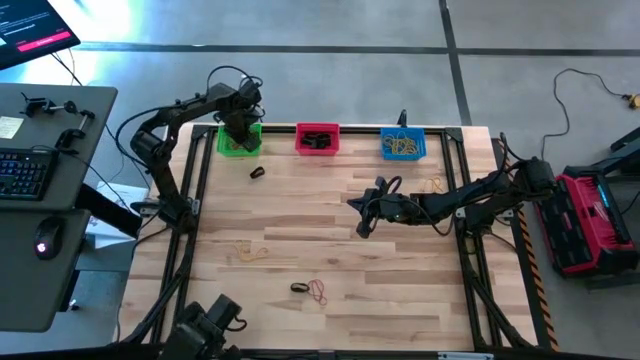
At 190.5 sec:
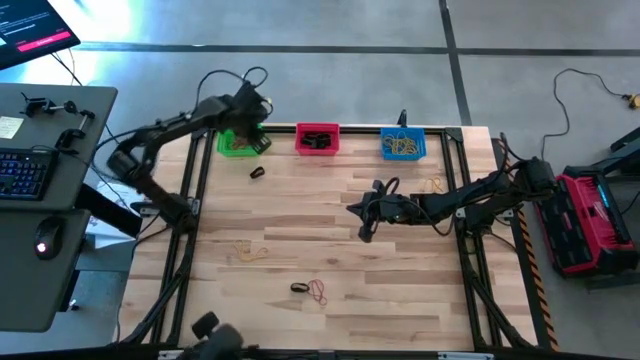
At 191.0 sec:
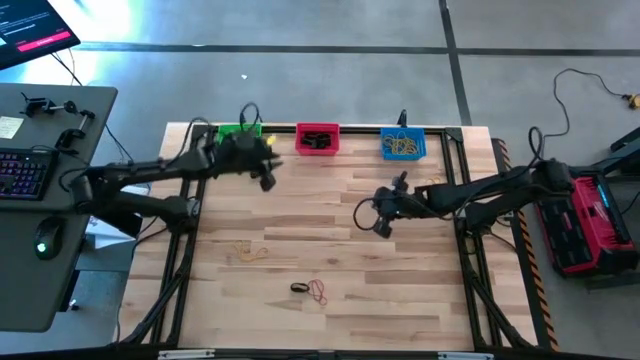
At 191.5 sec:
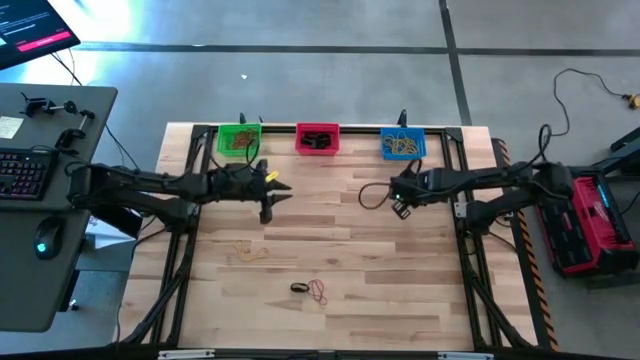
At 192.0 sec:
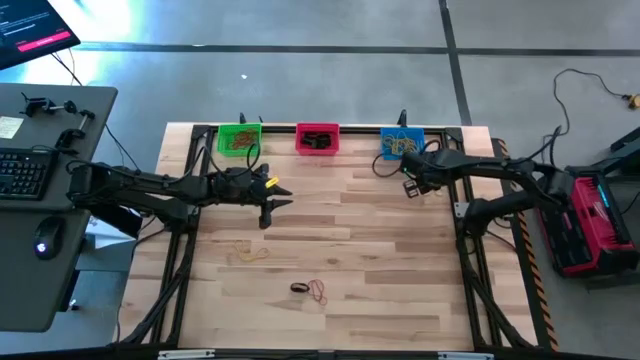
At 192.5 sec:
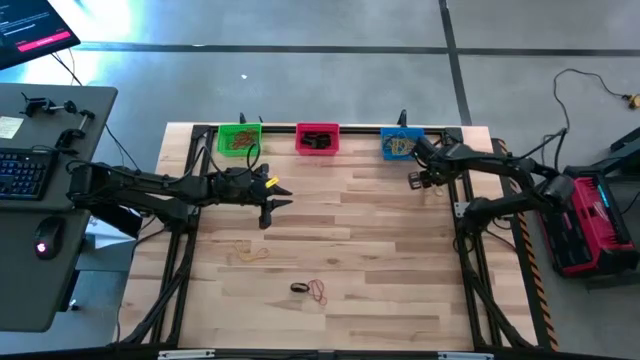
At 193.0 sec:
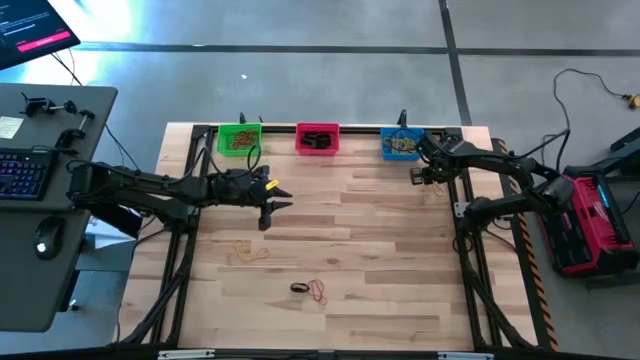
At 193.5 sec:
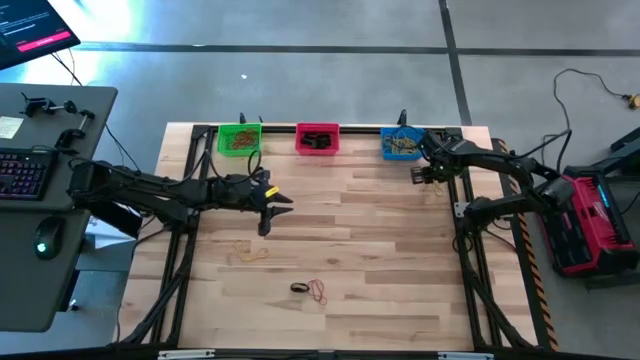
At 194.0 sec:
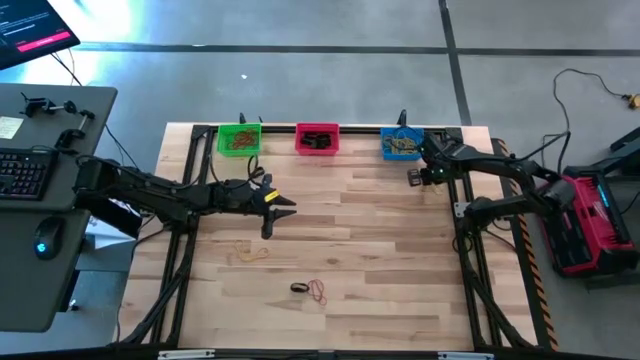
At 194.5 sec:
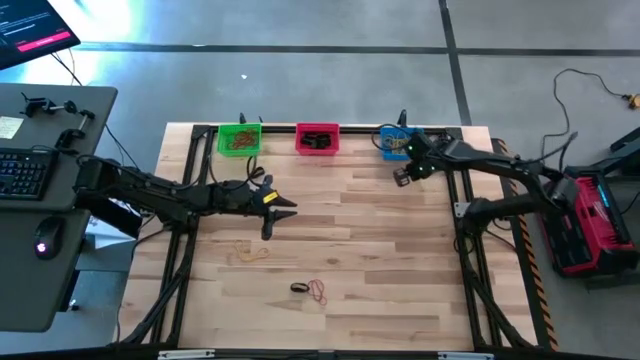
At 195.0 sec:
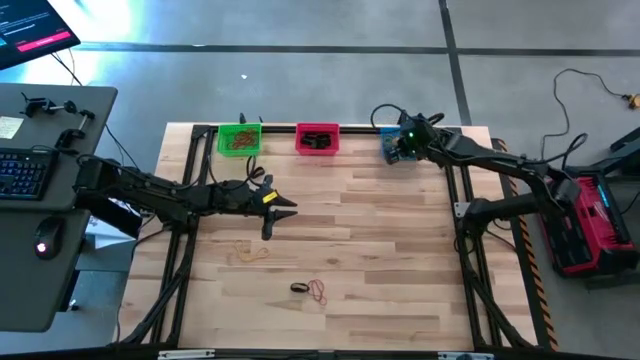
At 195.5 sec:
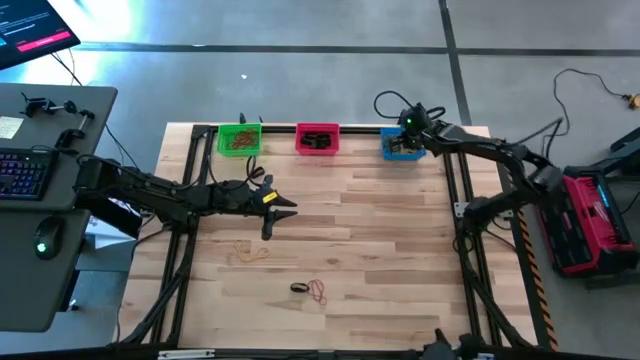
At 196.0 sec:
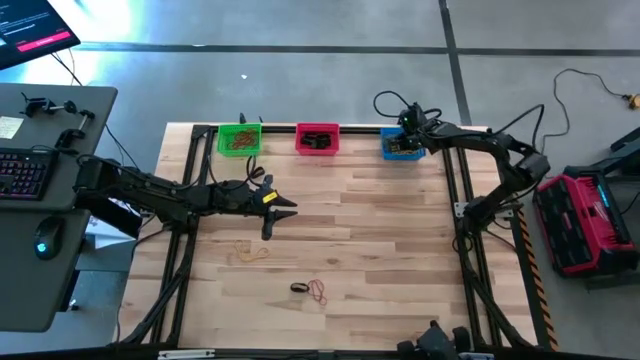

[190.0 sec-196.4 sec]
Task: Sort rubber bands into baskets
Put the yellow rubber band into the blue bin

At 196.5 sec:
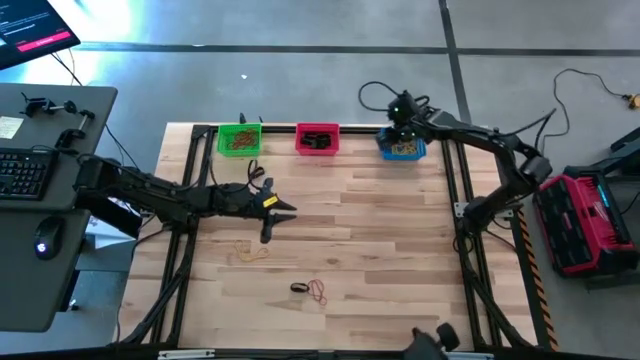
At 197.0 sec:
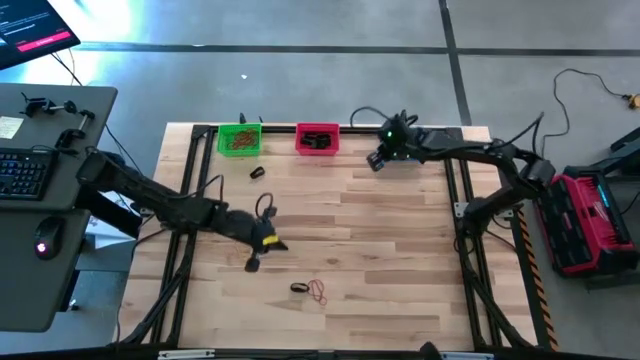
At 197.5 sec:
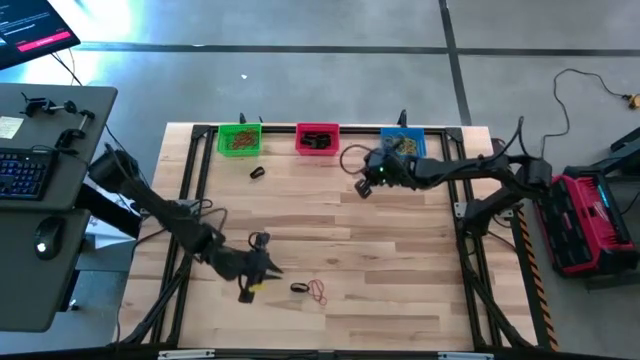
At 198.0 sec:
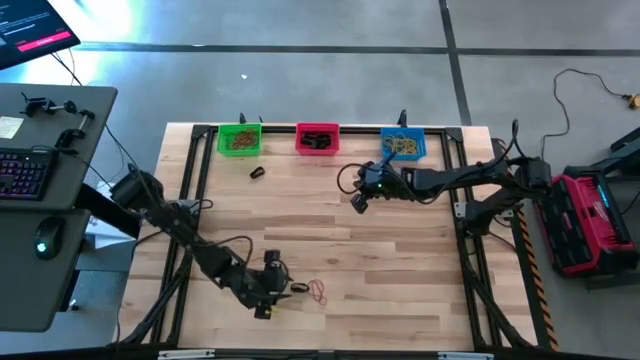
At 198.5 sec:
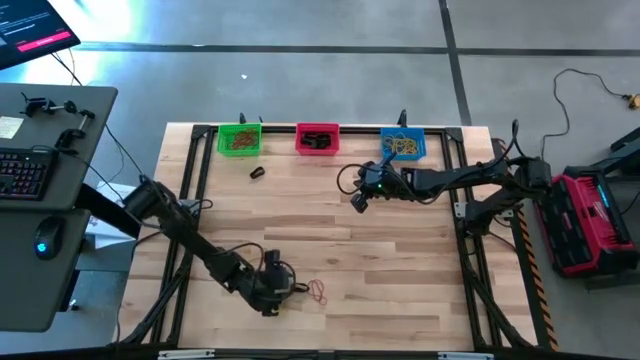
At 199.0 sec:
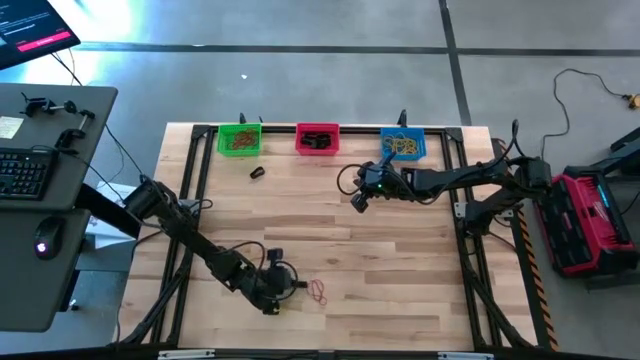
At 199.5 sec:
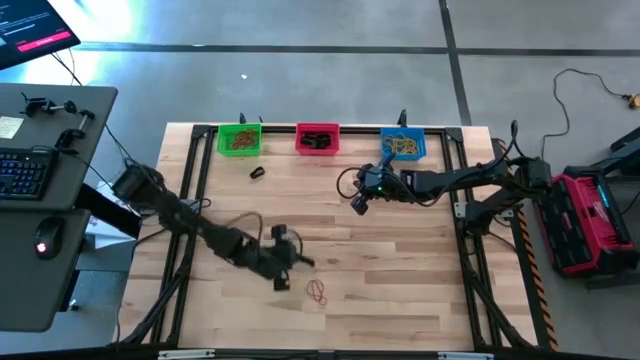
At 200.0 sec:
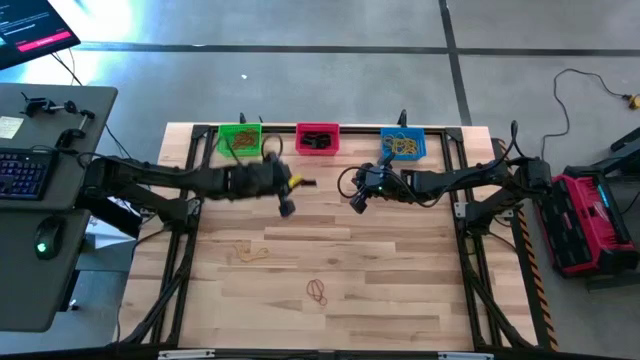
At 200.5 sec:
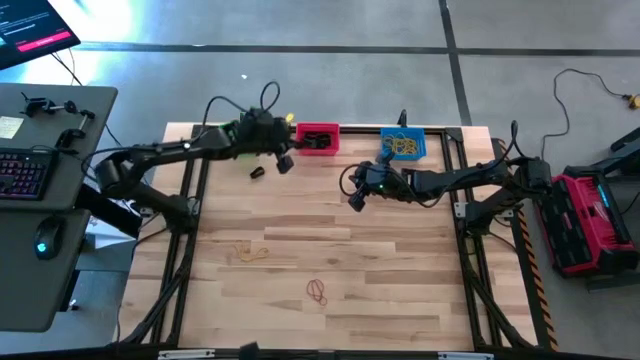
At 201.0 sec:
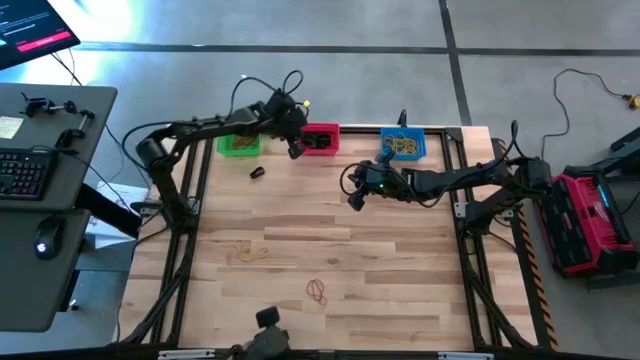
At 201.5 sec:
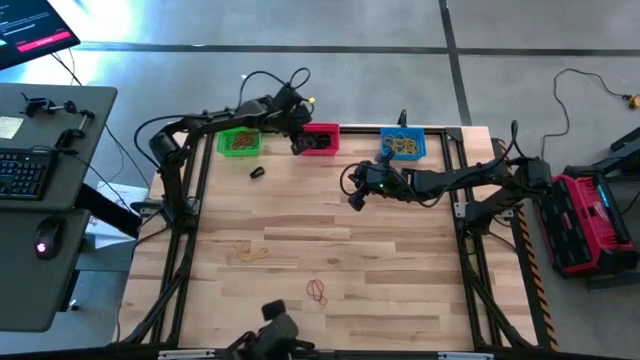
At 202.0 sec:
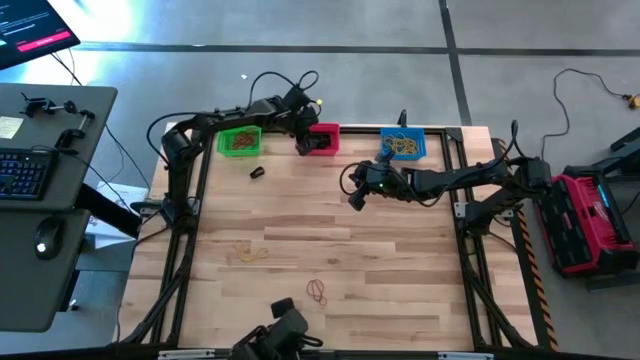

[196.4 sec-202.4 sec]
Put the black rubber band into the red bin

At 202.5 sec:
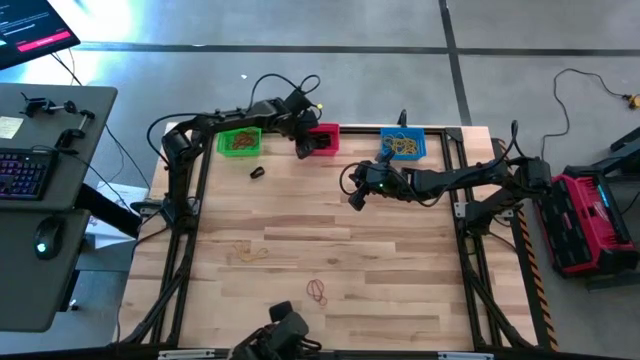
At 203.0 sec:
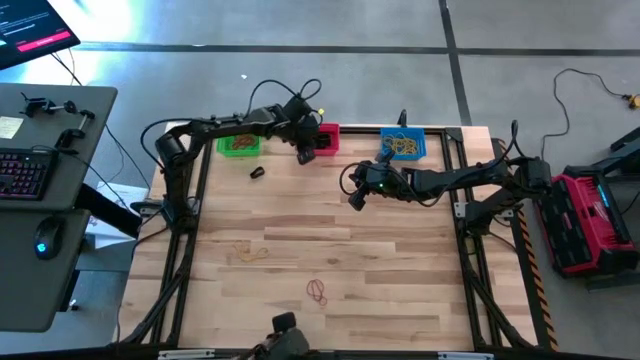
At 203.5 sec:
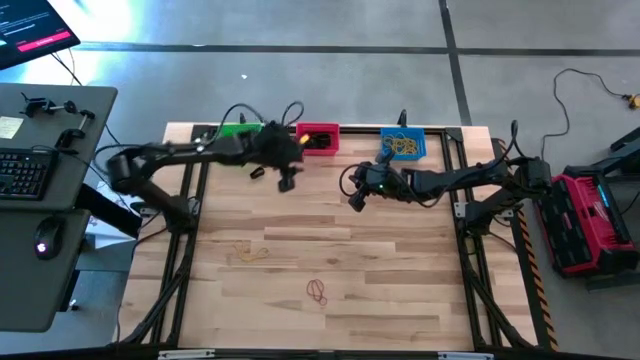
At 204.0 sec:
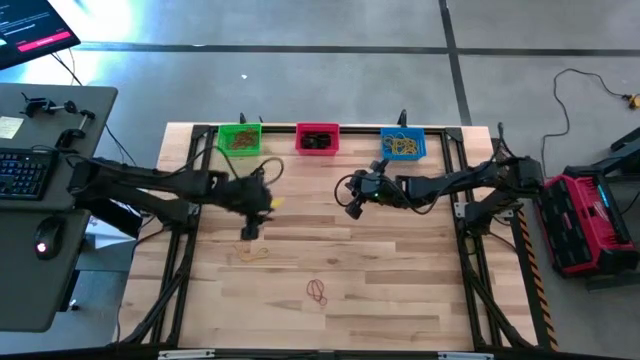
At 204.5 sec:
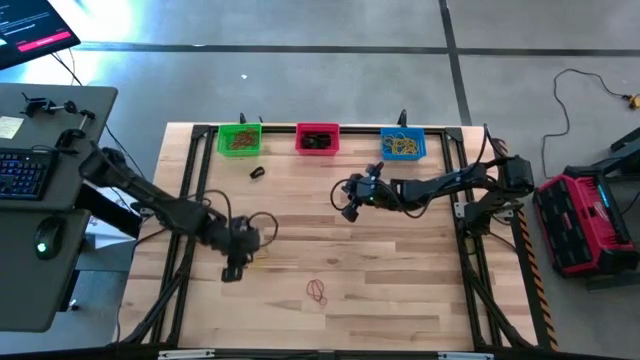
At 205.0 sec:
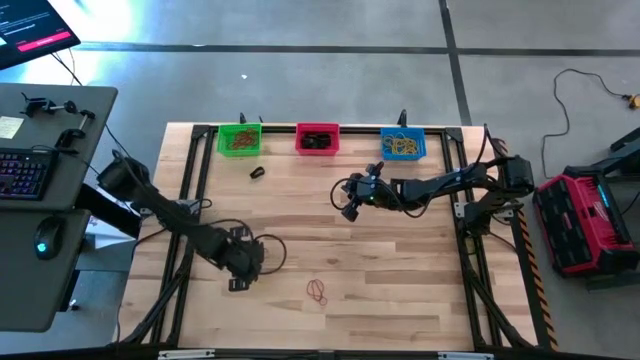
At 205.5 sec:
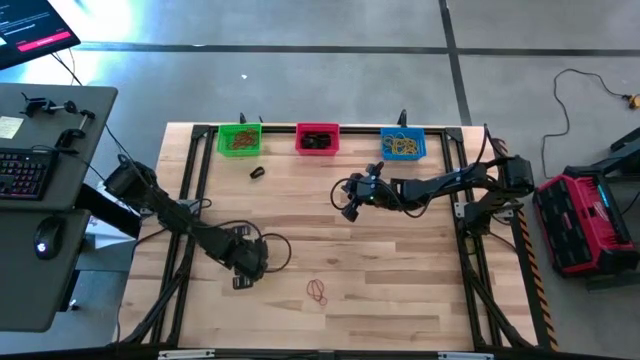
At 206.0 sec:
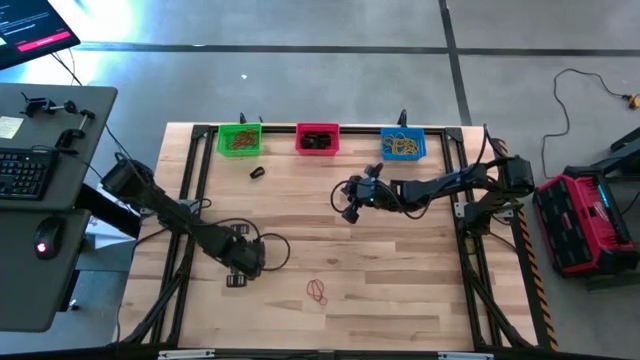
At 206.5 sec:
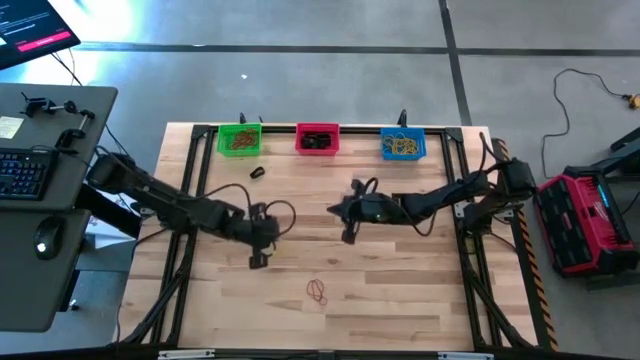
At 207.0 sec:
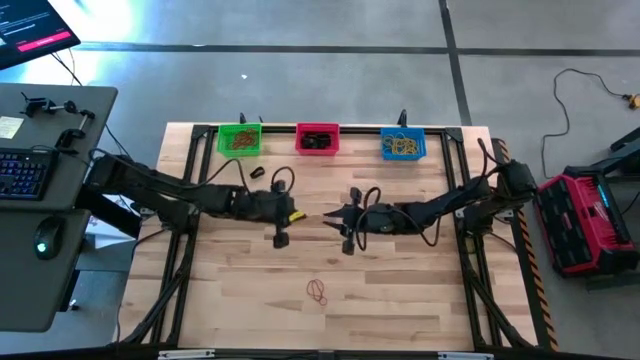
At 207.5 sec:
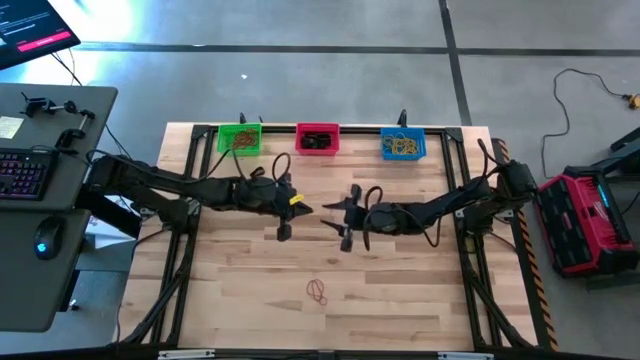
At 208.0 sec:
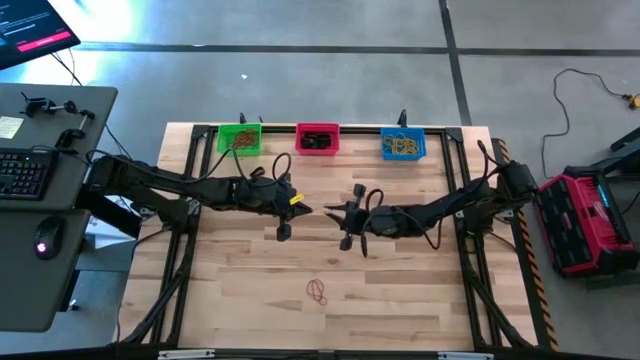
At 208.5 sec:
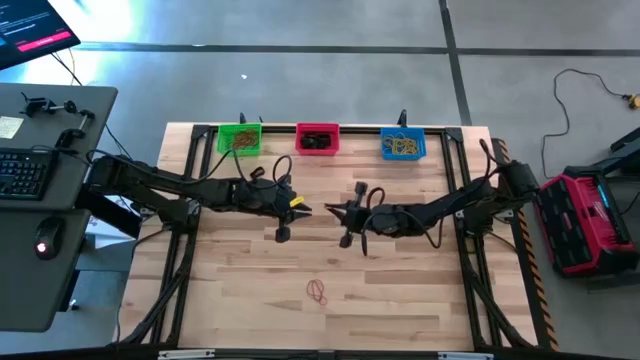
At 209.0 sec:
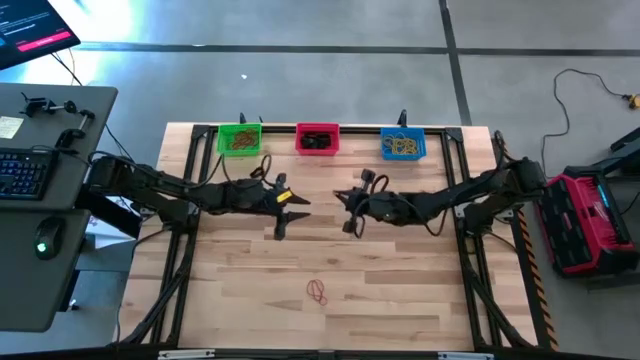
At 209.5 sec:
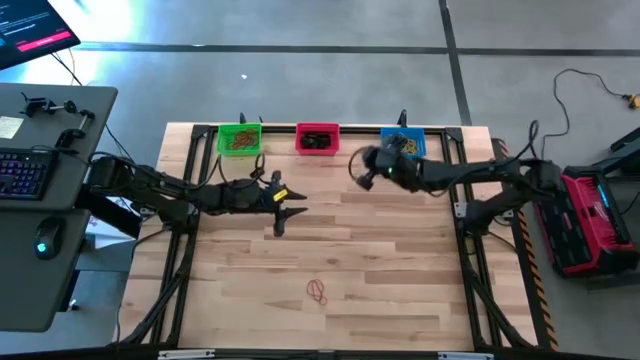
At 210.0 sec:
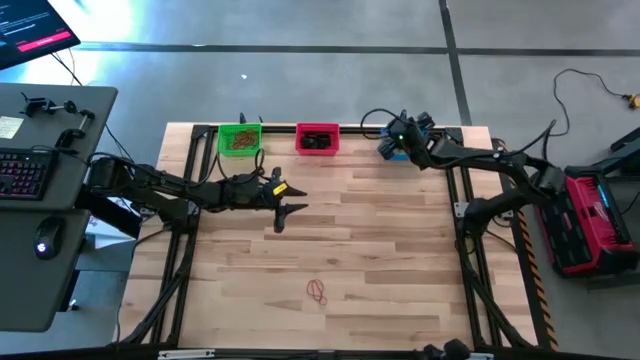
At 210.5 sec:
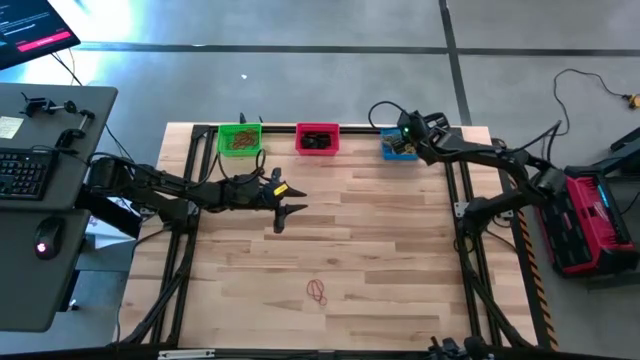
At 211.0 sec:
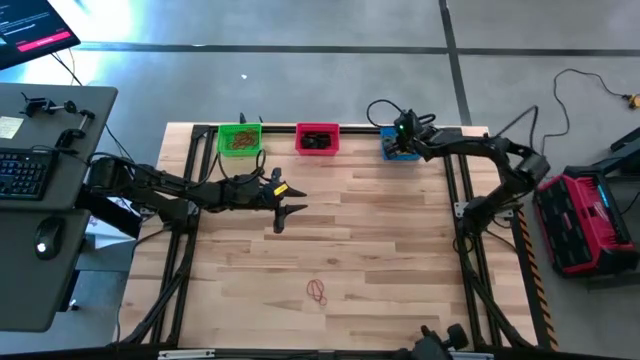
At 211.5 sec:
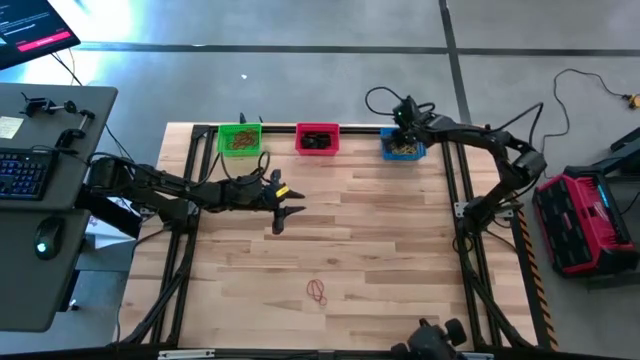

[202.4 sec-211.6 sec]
Put the yellow rubber band into the blue bin
